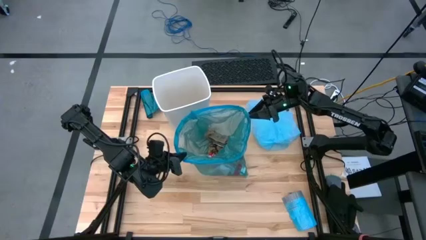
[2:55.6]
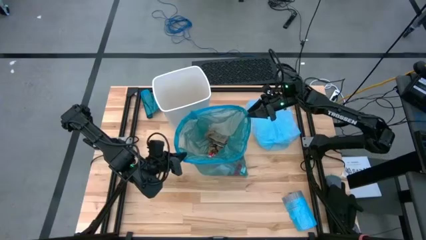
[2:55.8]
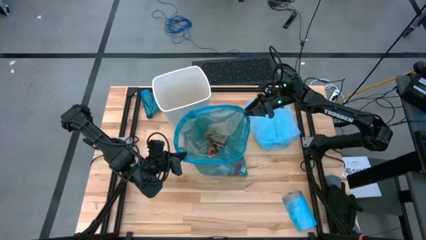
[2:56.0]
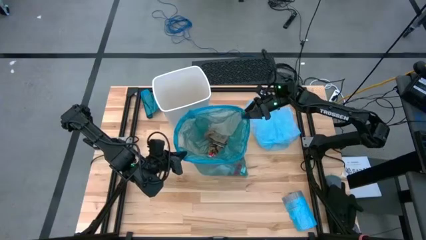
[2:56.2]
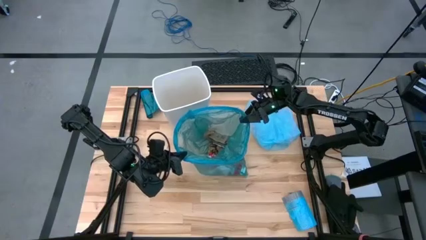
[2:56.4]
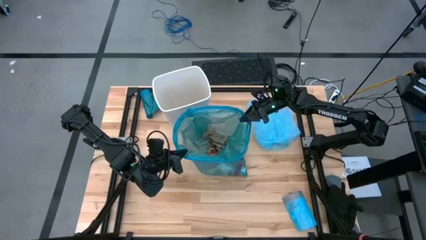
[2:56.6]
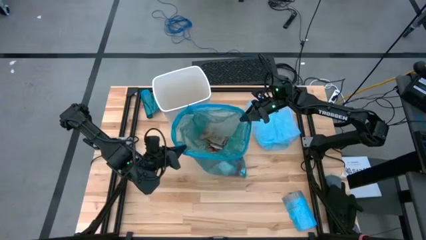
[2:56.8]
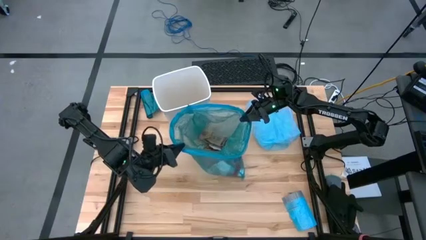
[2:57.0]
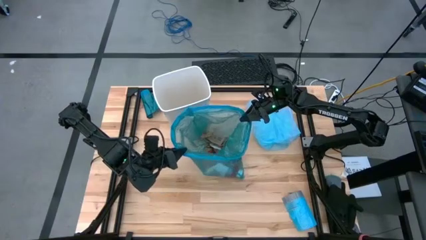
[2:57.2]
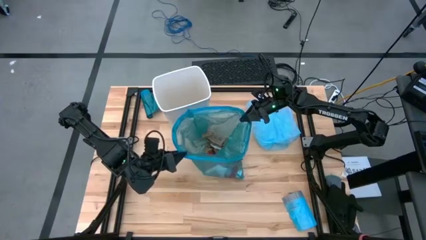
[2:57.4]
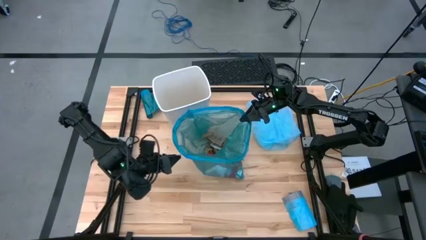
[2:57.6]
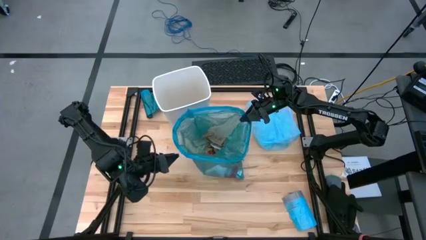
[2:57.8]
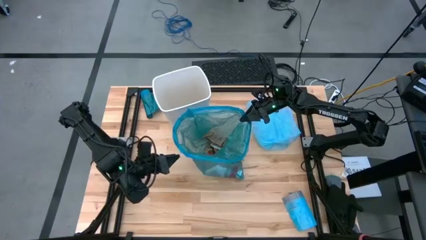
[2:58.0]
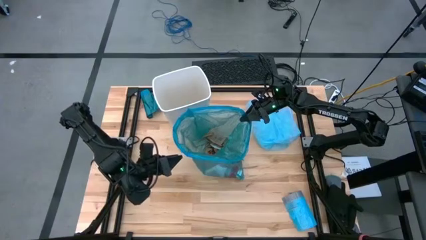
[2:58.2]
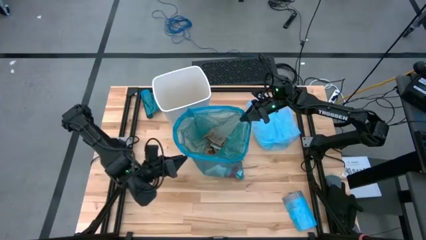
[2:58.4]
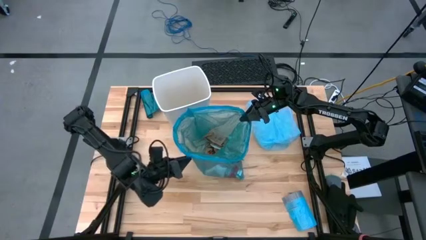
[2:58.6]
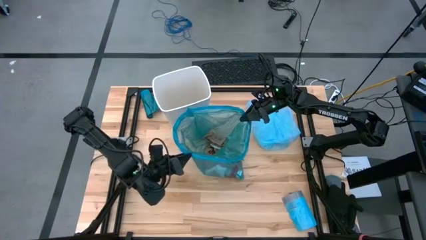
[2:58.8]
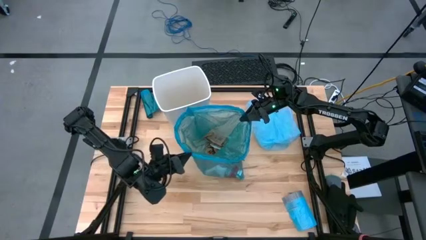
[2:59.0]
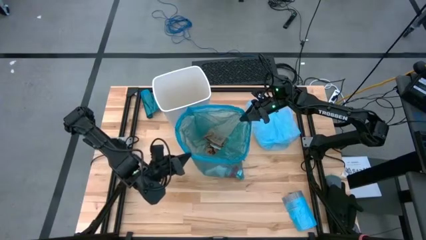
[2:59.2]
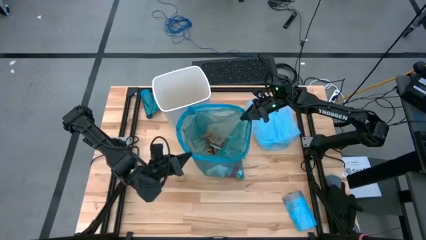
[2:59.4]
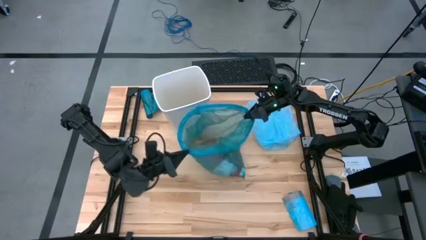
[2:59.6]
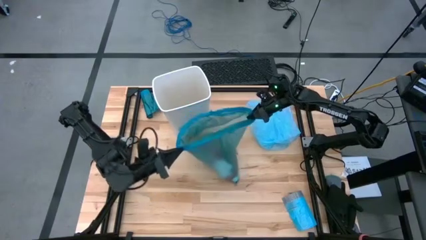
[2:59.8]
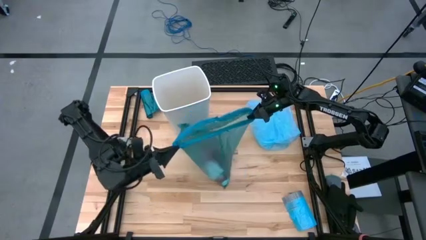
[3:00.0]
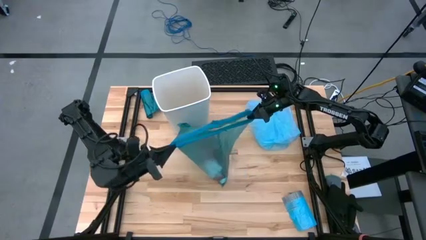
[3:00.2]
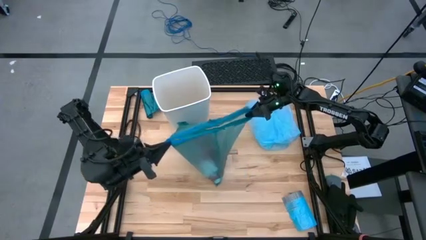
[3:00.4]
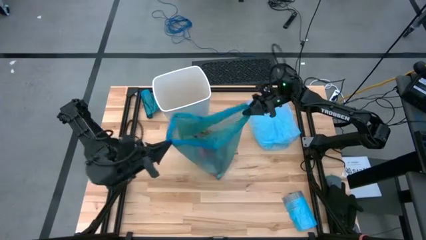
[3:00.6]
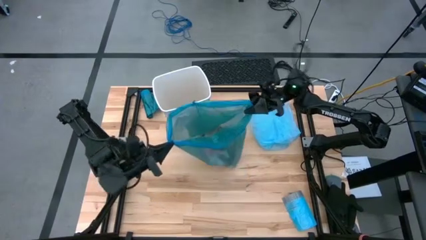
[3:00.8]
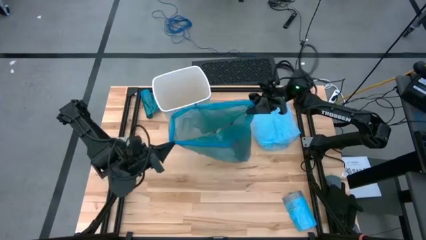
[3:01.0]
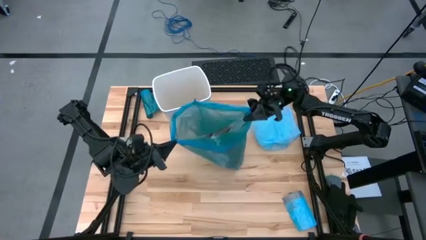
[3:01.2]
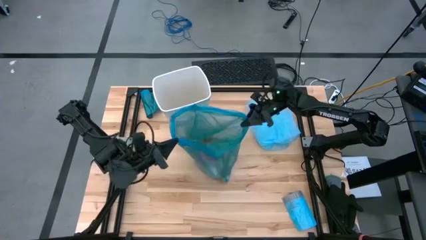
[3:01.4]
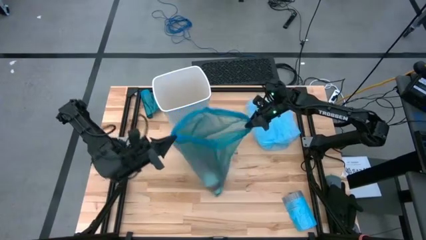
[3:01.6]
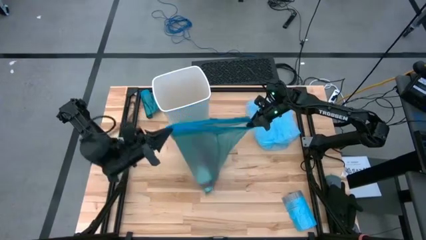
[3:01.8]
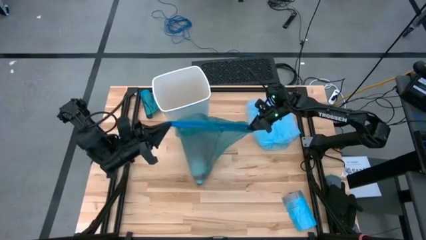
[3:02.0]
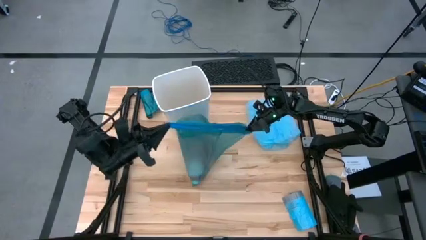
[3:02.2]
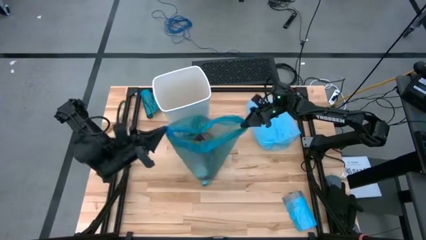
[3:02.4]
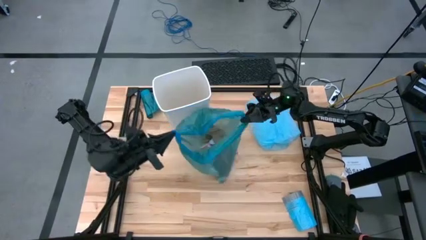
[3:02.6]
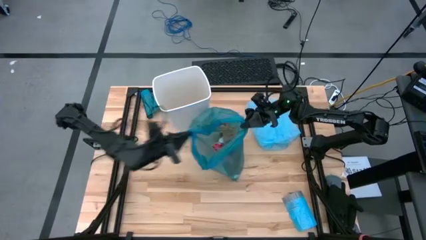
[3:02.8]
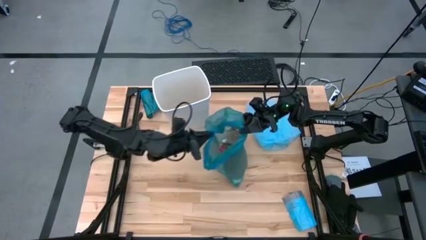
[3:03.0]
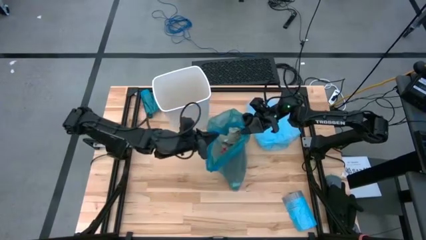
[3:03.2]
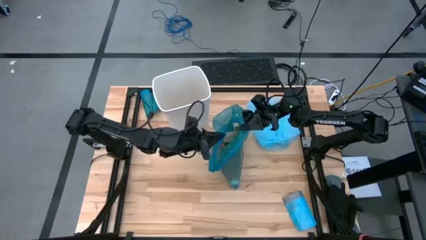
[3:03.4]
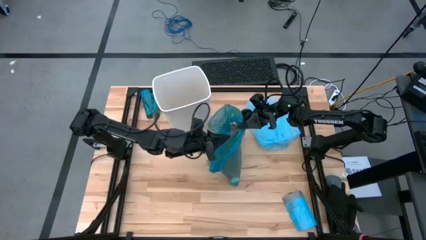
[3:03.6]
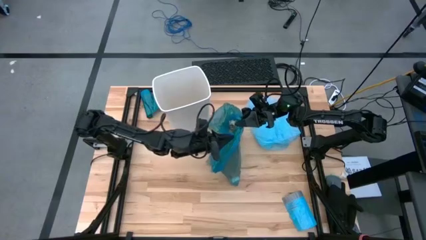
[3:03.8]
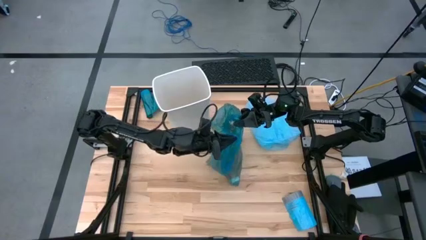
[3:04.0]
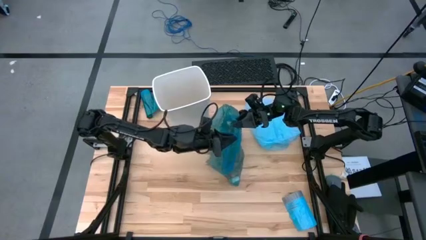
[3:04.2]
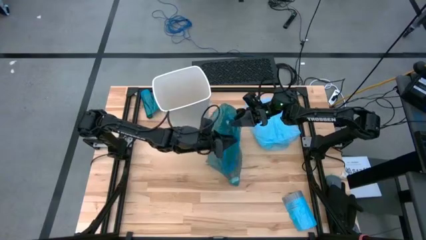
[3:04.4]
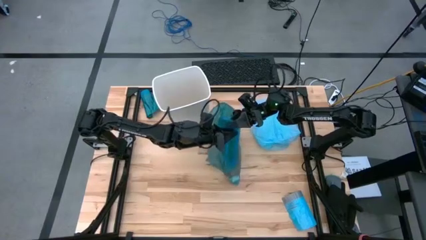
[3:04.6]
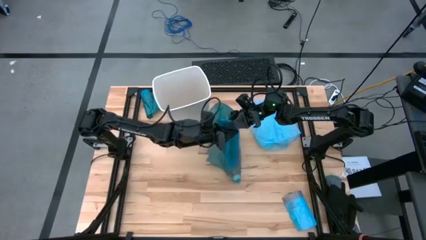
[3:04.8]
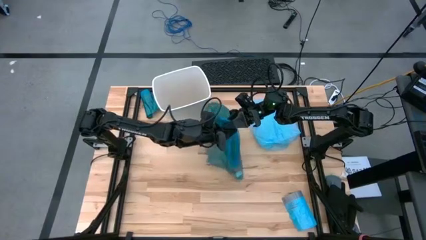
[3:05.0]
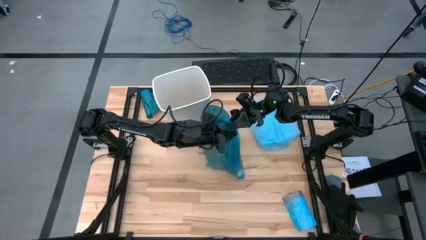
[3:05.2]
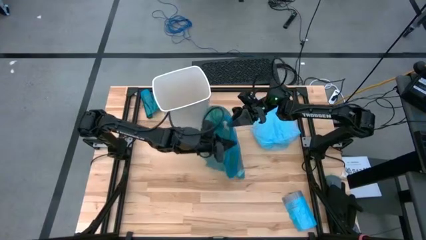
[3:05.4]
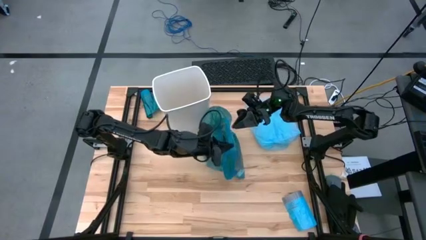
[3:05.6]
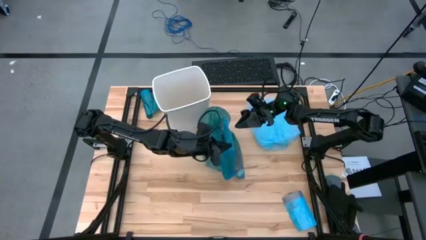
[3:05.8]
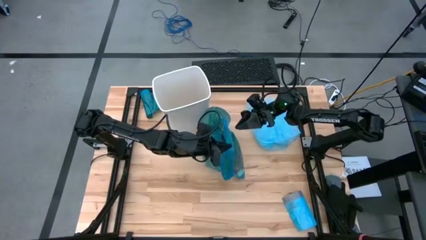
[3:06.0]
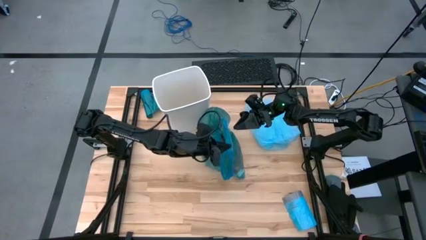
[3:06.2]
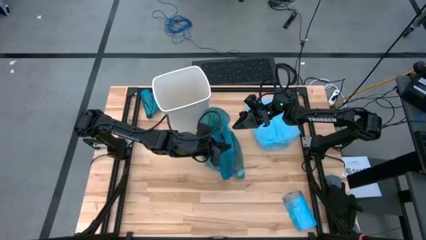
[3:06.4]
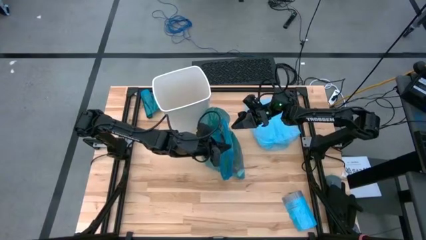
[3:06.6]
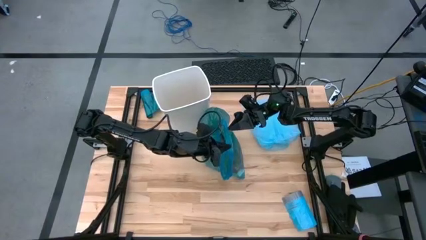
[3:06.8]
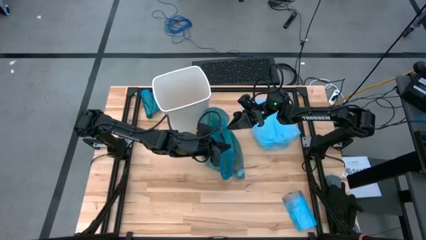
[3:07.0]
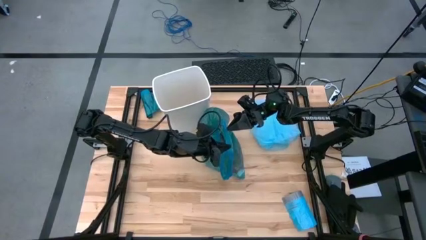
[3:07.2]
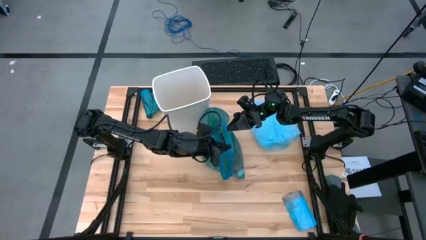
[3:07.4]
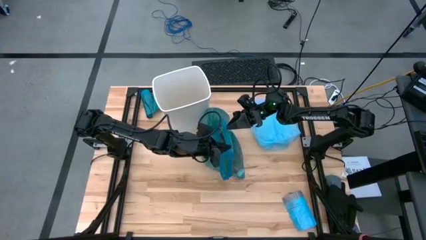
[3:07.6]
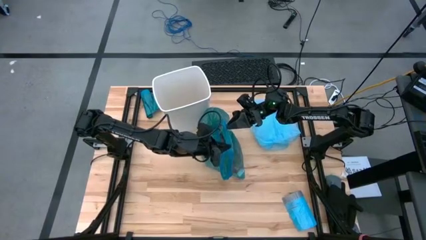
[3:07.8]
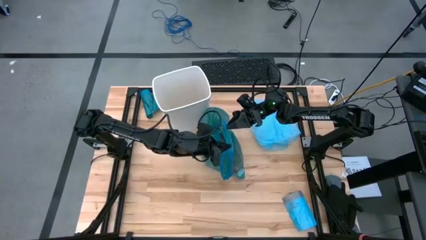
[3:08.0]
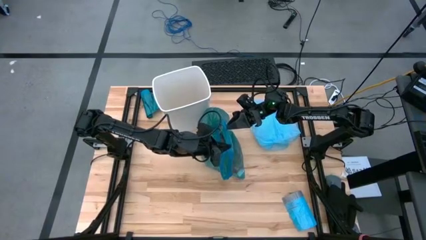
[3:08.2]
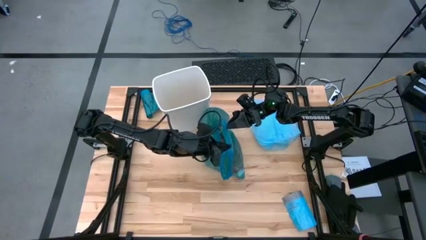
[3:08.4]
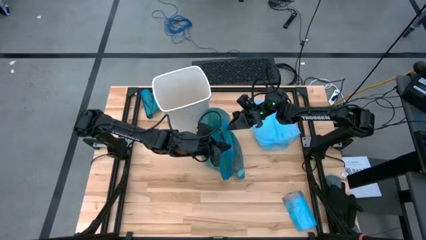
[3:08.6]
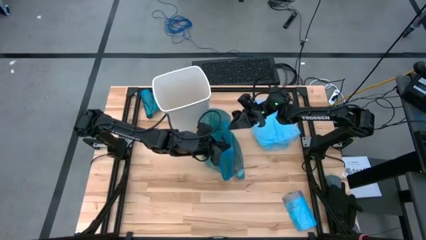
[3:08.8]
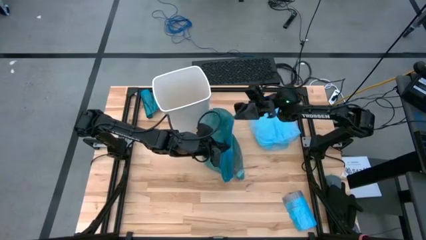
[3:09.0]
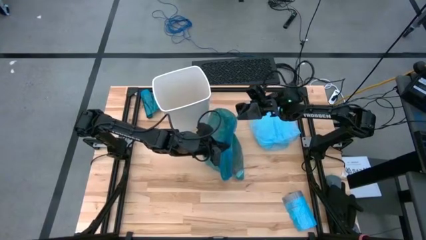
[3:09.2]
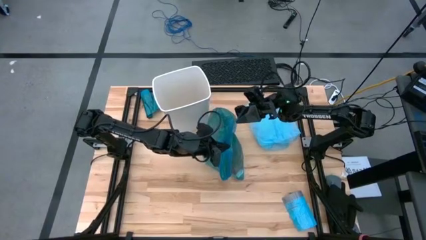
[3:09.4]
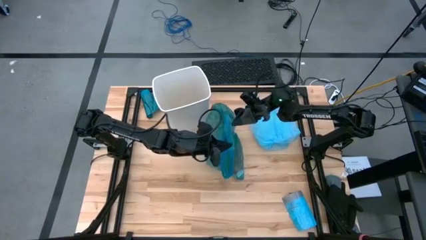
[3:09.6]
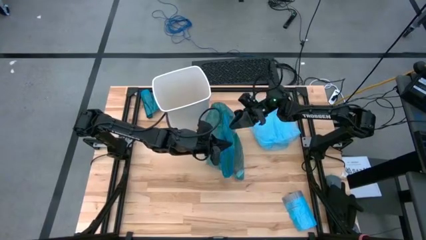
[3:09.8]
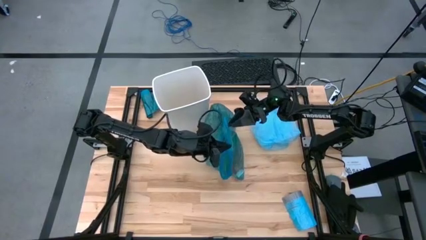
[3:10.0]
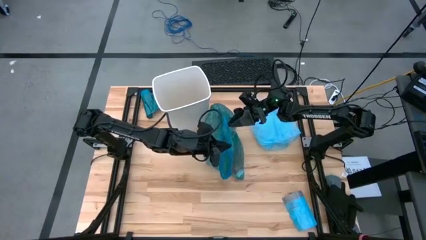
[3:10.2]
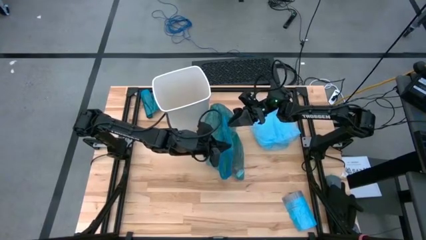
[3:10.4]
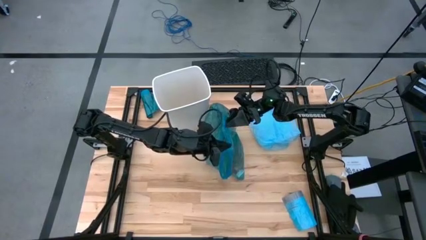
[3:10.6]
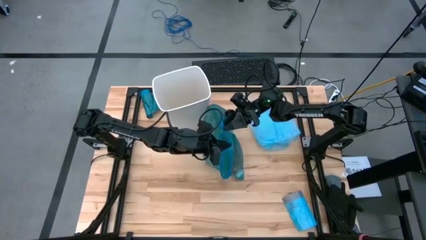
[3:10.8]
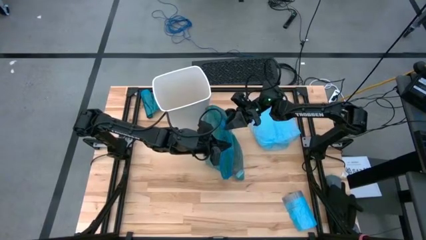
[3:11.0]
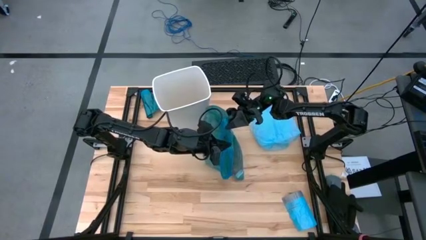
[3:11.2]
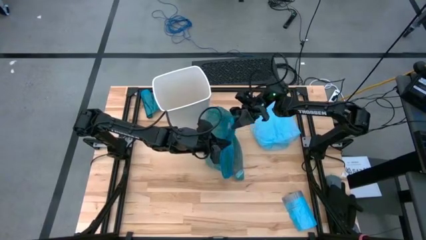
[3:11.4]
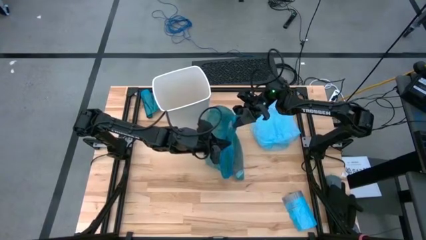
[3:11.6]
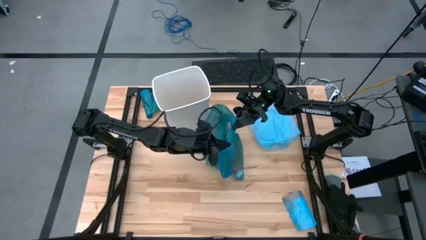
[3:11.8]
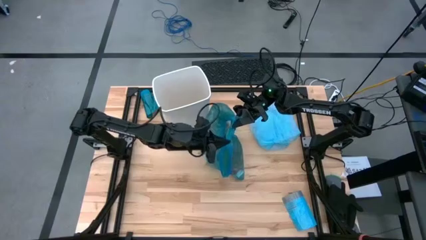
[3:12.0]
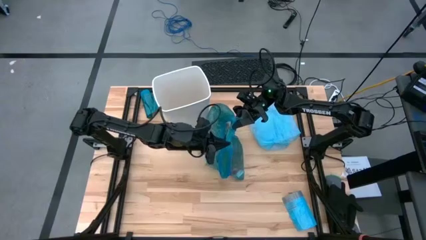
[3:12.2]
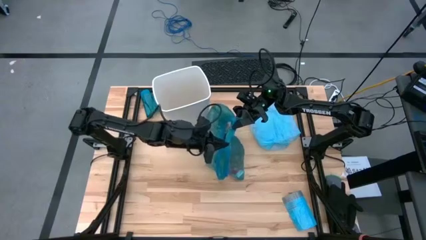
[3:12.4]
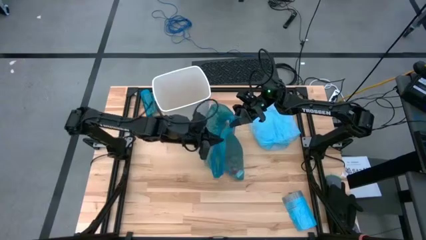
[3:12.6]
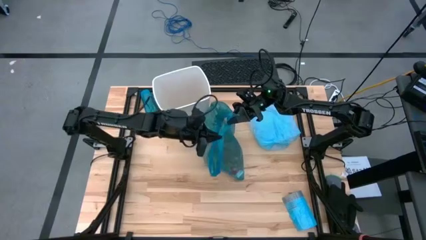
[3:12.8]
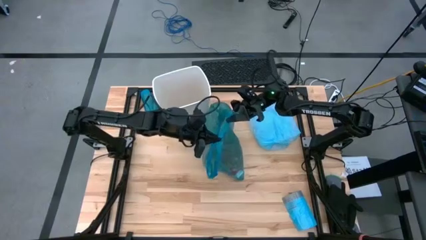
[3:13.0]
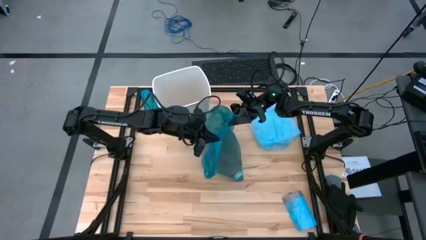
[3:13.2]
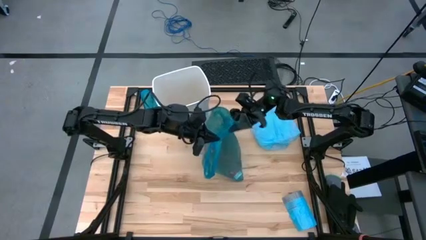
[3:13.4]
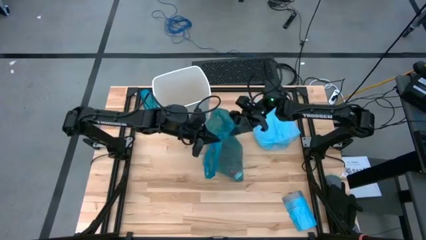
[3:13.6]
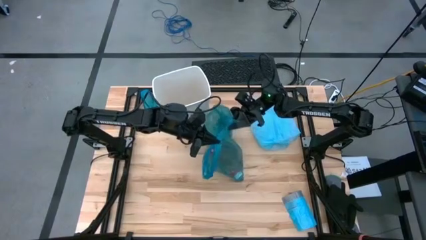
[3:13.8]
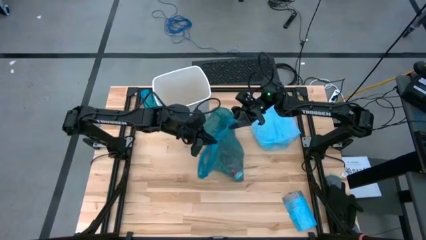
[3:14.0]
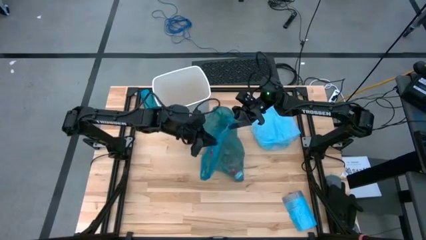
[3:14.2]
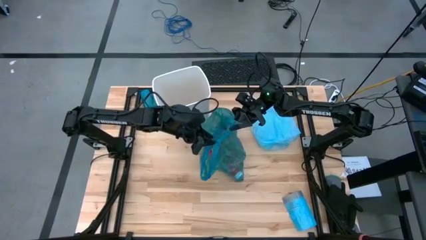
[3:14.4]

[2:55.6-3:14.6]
Task: place trash/remove bag and relplace
Close the blue trash bag
